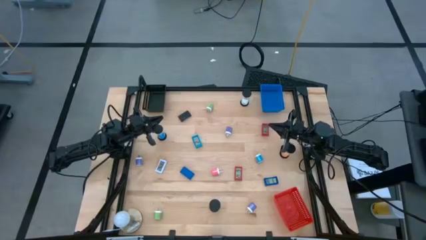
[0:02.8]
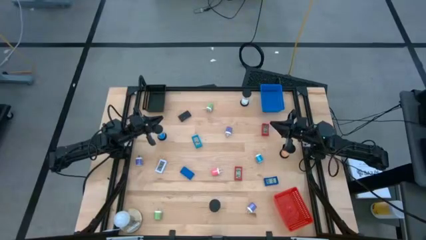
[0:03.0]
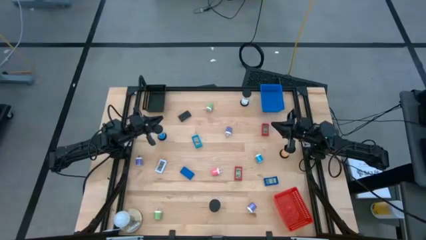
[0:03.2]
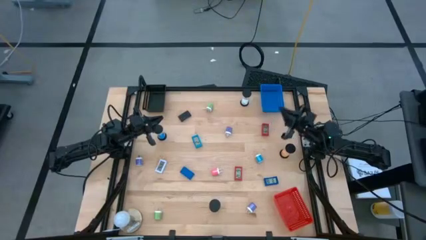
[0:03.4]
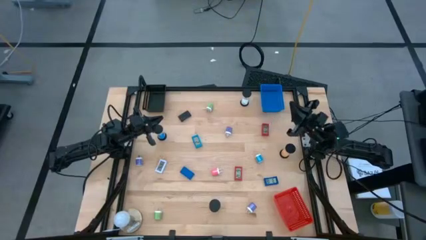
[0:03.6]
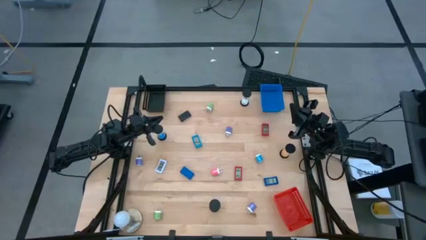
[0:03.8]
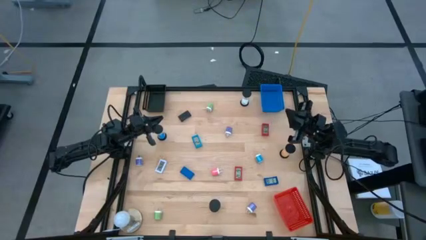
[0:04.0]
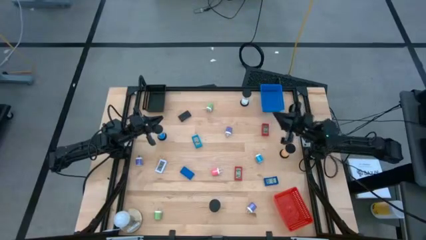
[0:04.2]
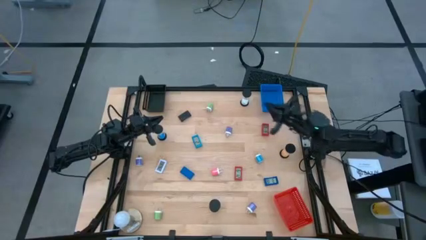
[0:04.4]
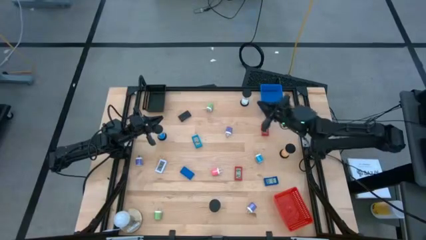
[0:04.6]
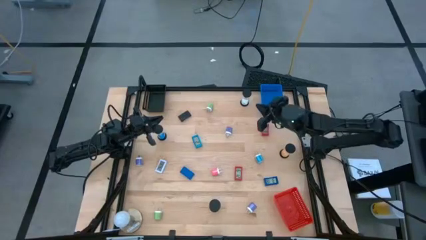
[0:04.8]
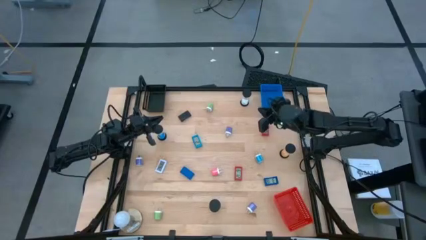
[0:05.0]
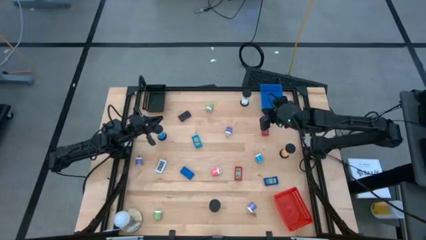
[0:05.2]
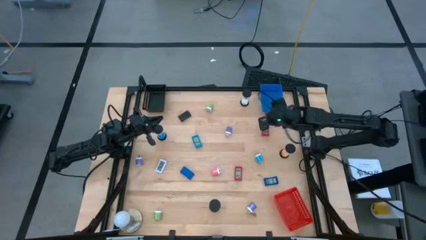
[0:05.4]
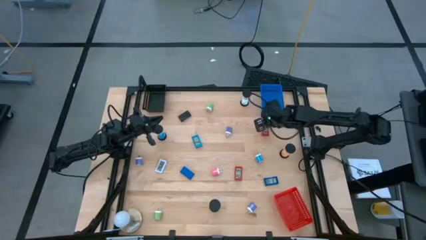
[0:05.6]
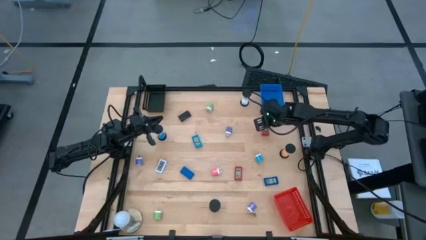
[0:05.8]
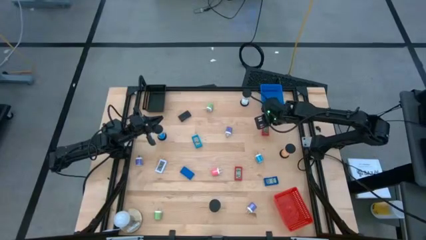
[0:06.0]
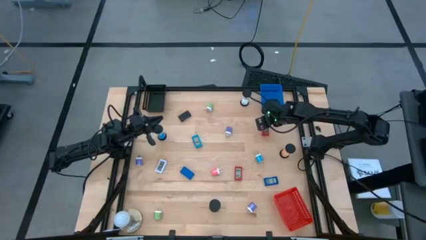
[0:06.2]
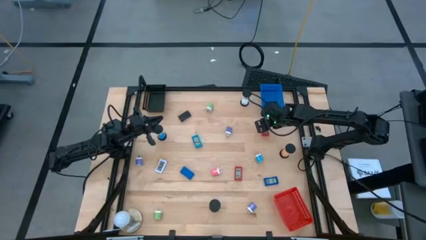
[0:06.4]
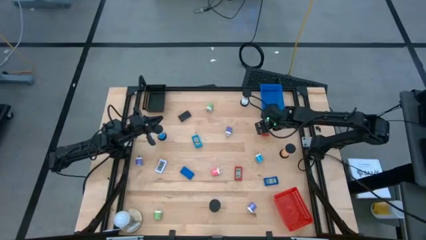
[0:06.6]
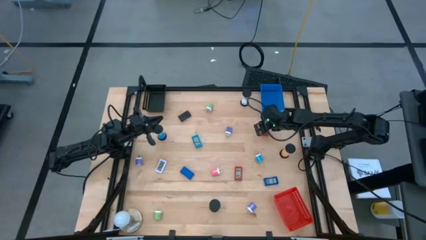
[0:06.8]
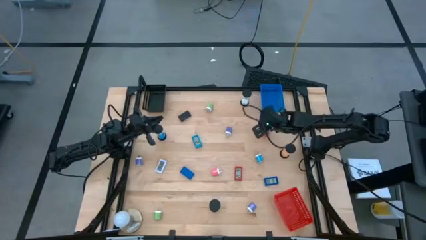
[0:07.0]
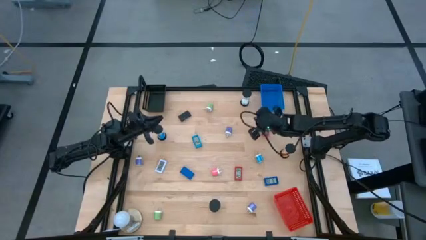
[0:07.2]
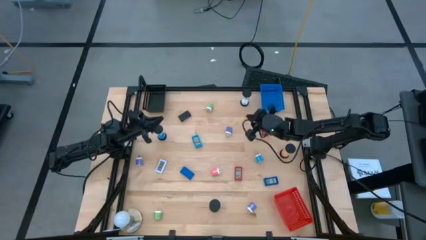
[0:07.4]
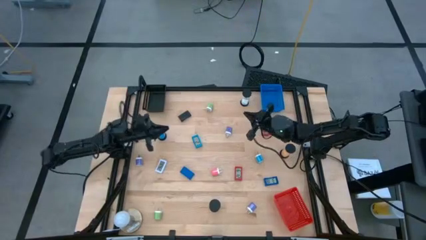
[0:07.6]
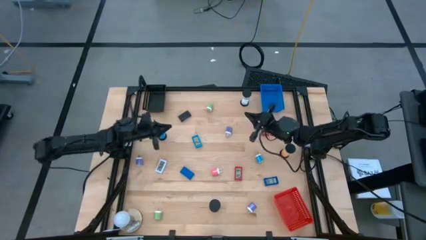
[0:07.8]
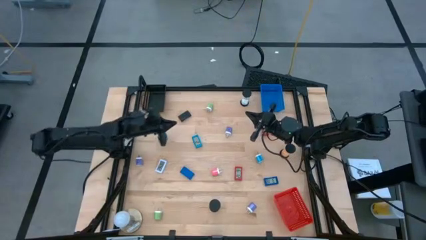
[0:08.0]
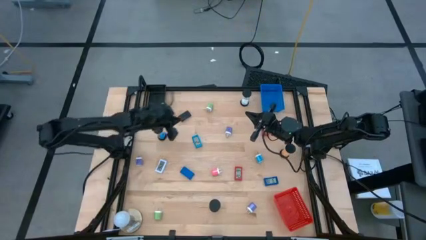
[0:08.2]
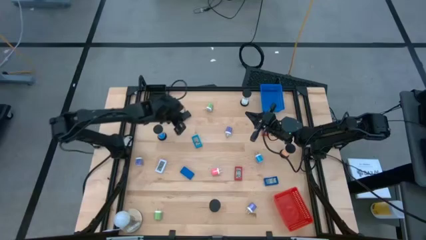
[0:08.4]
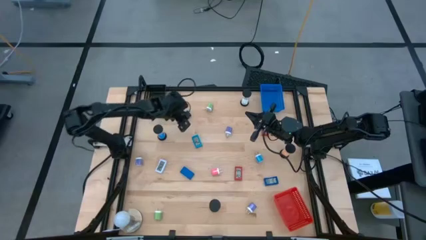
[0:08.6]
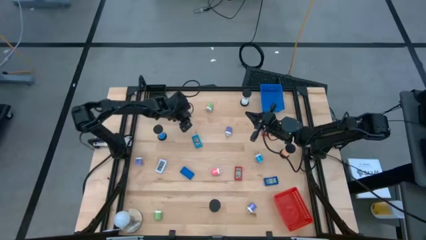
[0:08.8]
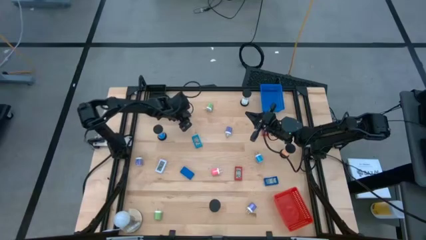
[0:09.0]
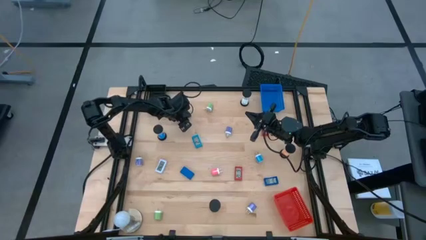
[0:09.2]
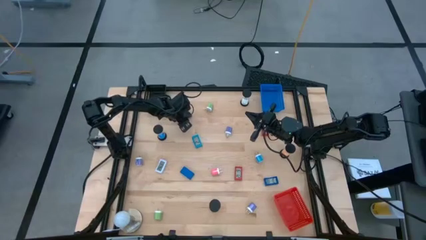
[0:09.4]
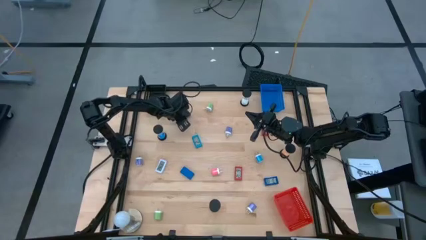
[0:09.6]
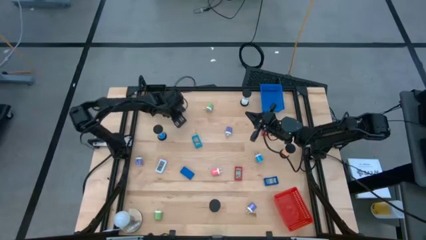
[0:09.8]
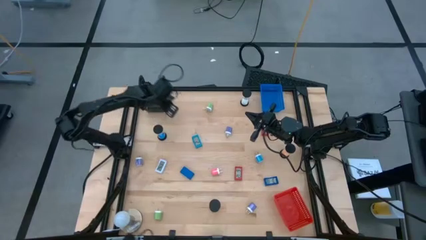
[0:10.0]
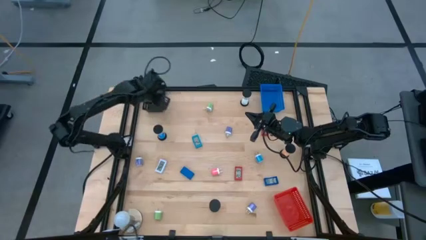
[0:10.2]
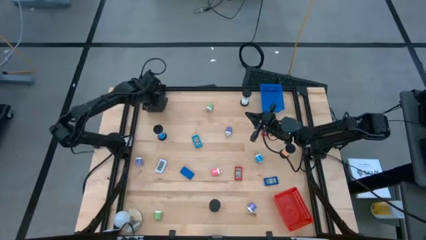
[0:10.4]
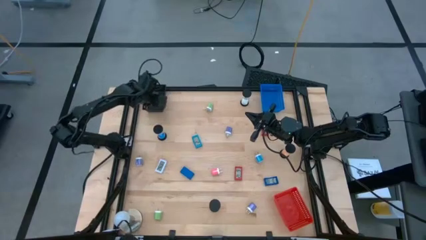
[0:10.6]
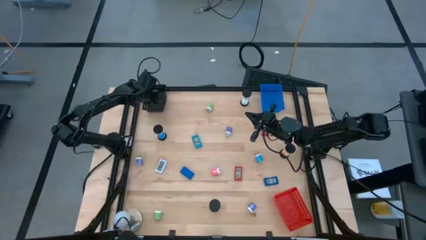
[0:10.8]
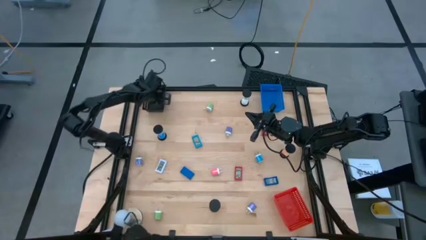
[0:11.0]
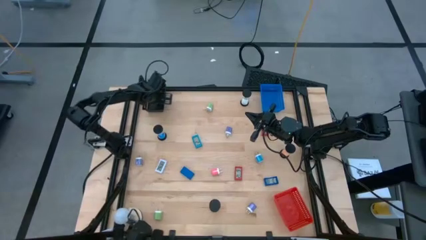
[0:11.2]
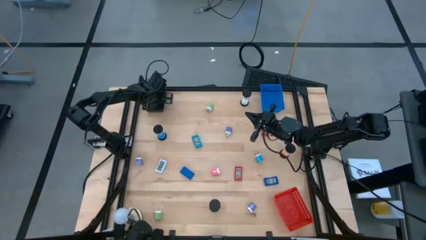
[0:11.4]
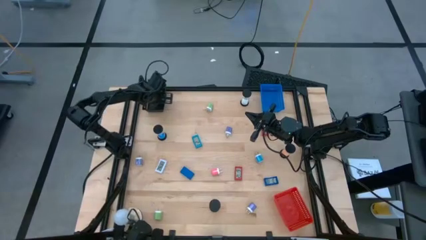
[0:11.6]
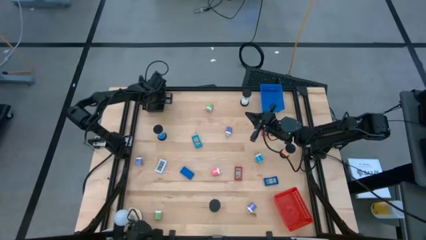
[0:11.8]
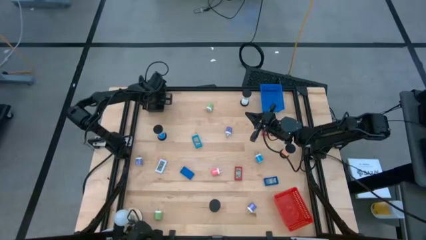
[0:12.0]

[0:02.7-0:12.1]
Task: Pick & Place Office items
Put the black digital timer into the black basket

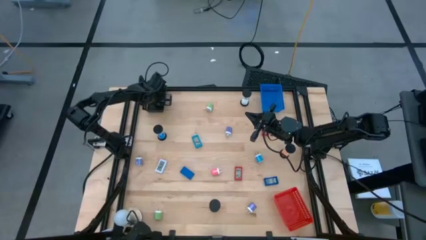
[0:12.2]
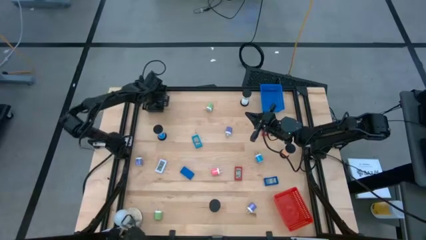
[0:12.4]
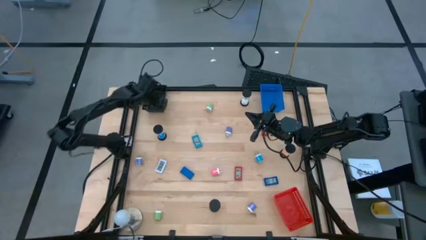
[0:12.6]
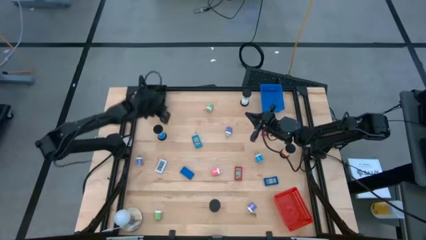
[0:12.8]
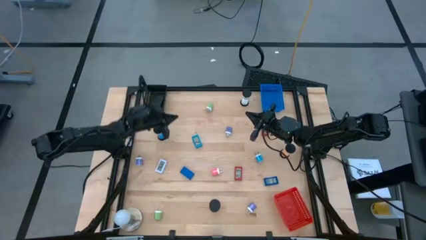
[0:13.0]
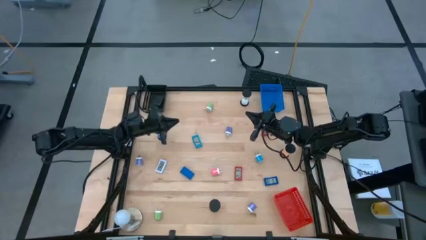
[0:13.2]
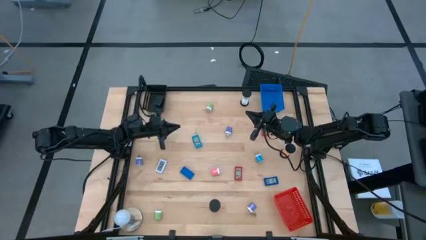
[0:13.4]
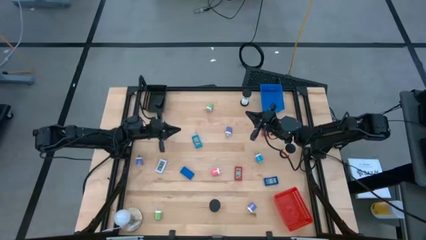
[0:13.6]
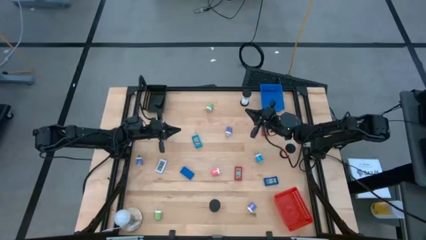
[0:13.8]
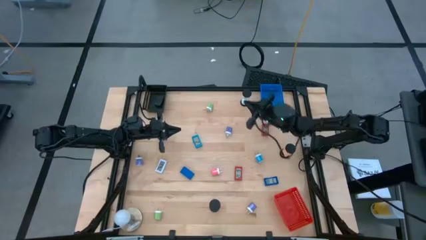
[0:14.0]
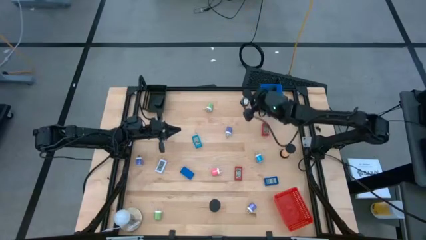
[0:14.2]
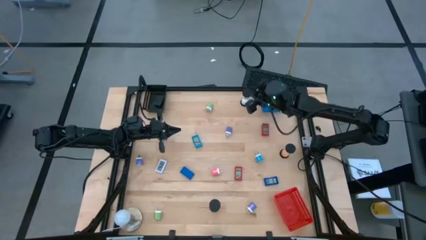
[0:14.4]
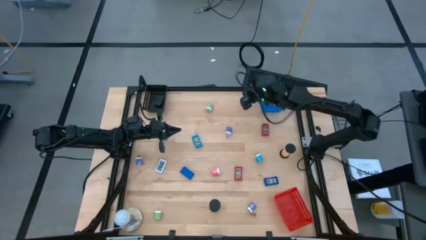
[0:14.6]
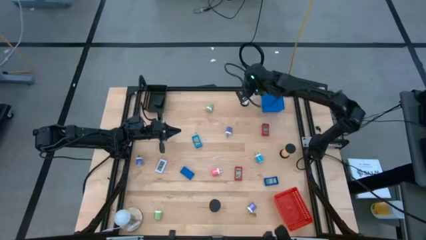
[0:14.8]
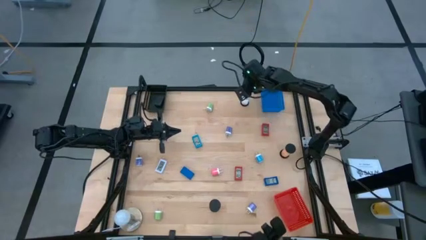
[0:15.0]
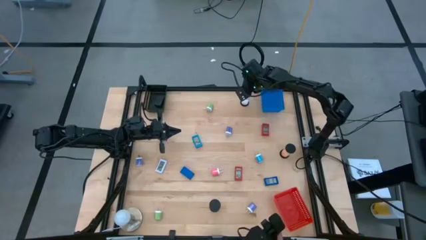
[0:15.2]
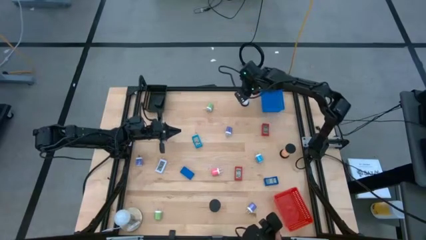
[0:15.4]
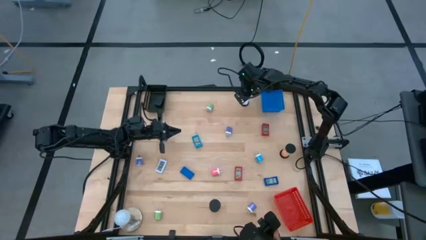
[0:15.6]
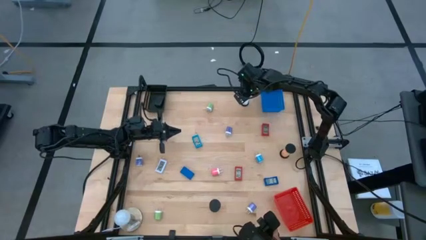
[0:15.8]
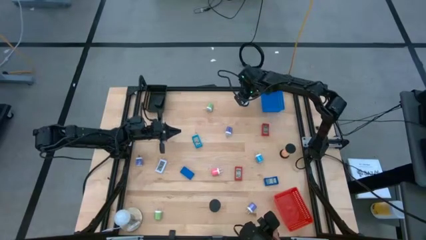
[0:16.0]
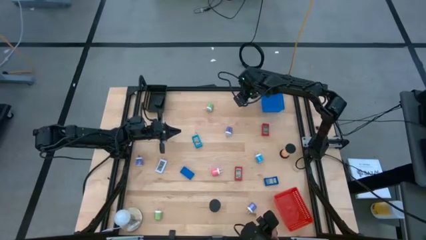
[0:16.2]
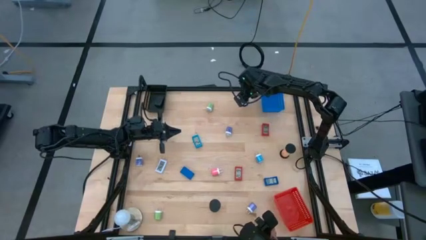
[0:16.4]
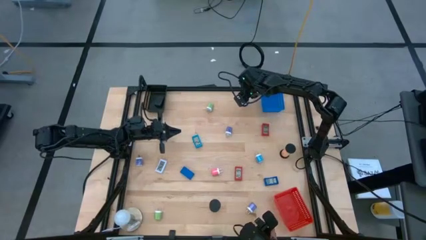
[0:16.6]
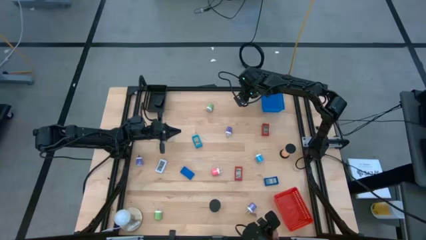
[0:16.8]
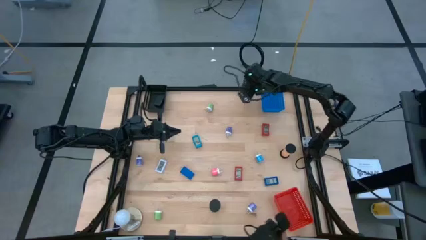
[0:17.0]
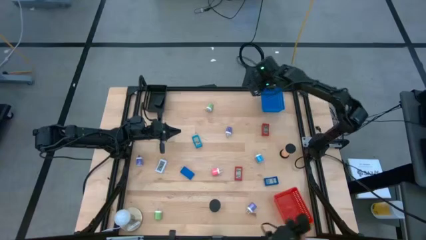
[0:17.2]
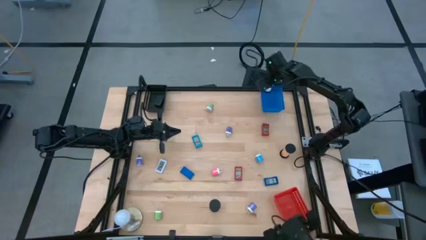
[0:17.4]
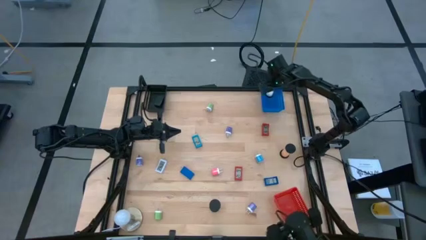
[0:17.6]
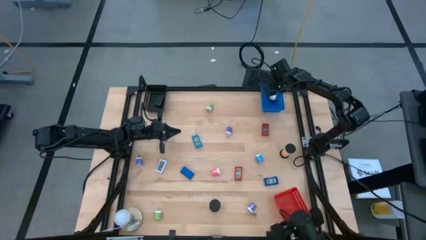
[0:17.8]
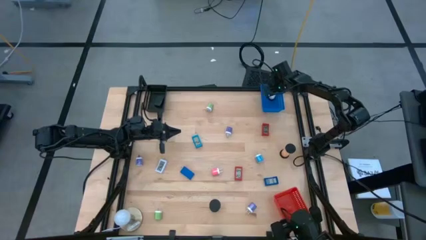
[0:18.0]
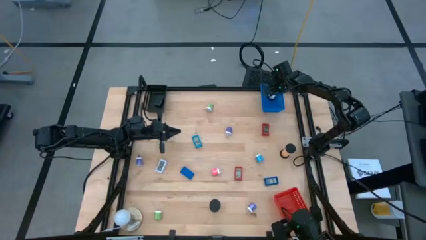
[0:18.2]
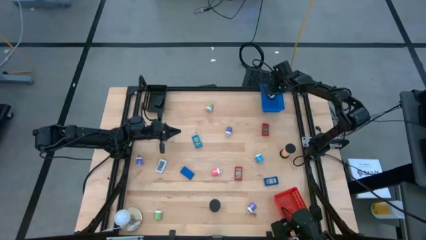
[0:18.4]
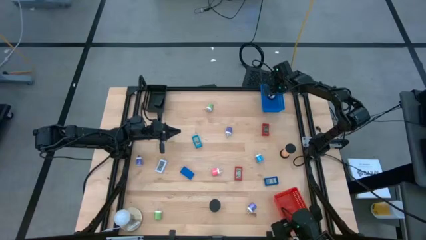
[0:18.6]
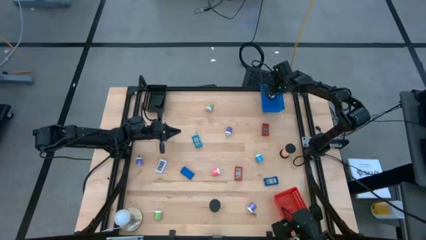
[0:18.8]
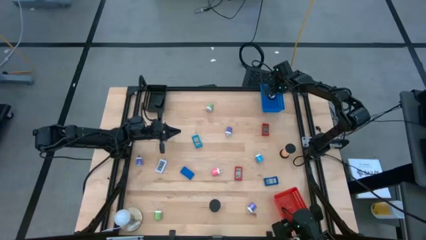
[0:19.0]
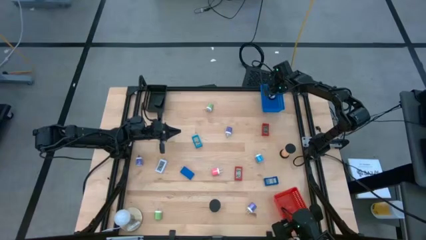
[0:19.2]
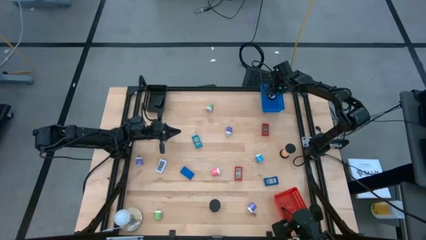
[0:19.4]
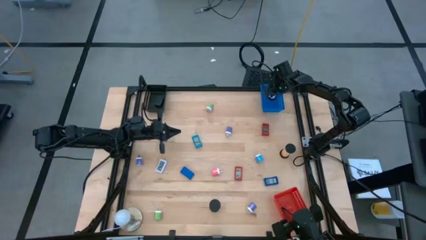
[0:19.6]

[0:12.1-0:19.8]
Put the white sand timer into the blue basket
